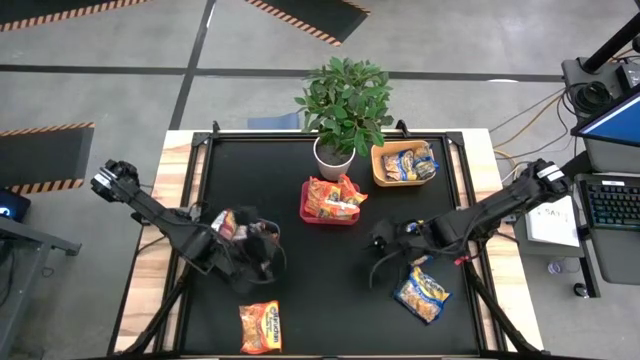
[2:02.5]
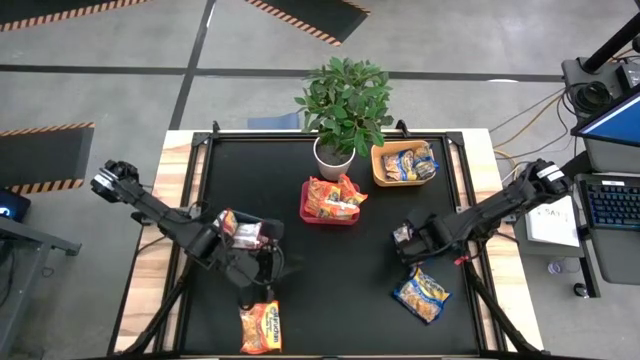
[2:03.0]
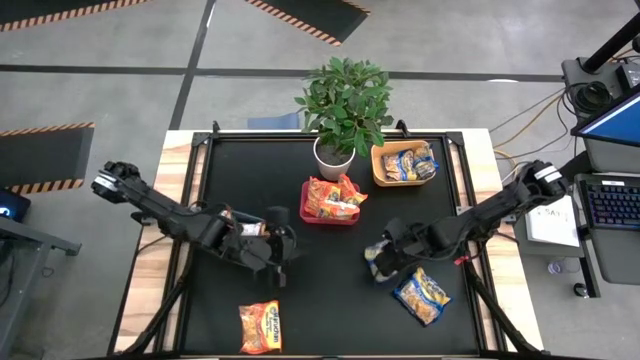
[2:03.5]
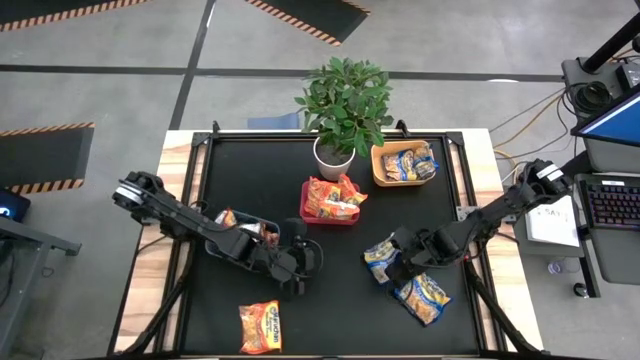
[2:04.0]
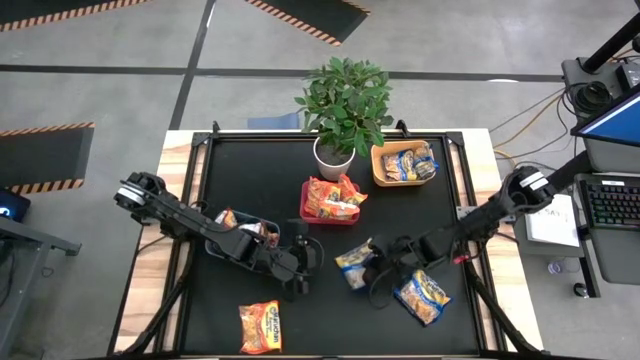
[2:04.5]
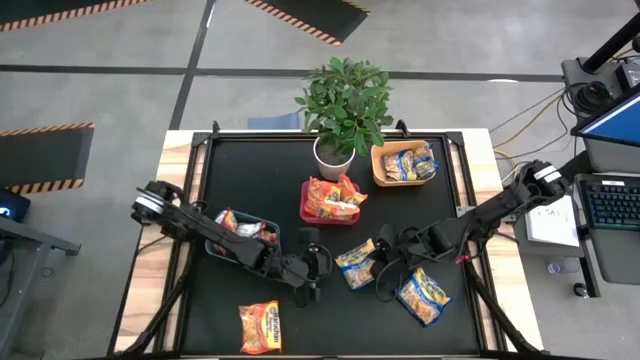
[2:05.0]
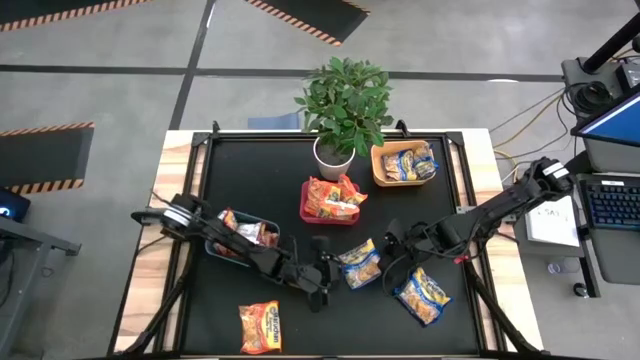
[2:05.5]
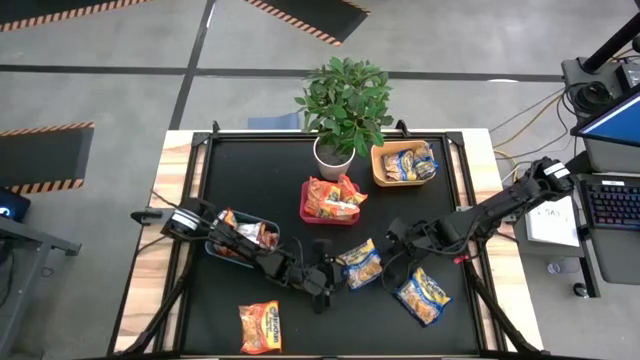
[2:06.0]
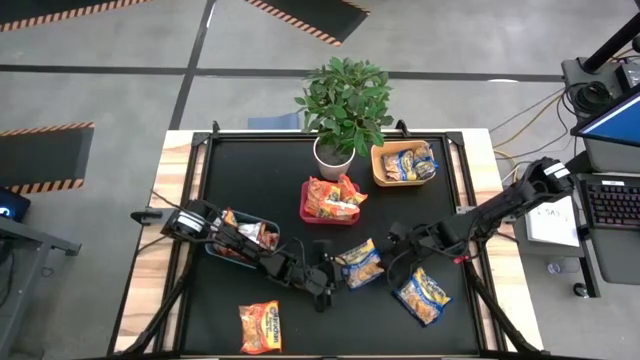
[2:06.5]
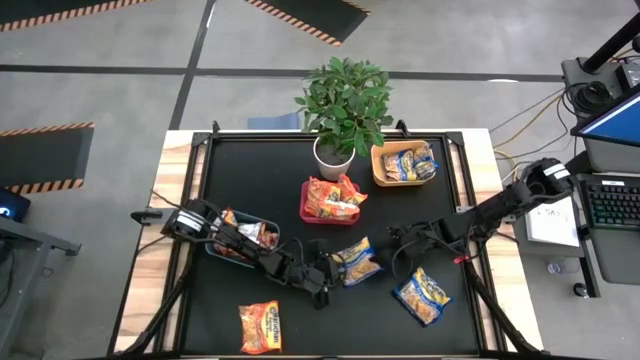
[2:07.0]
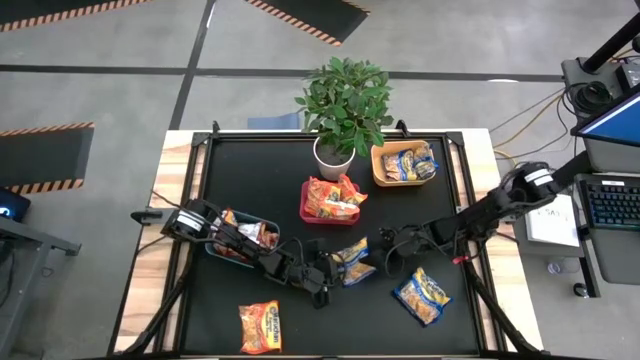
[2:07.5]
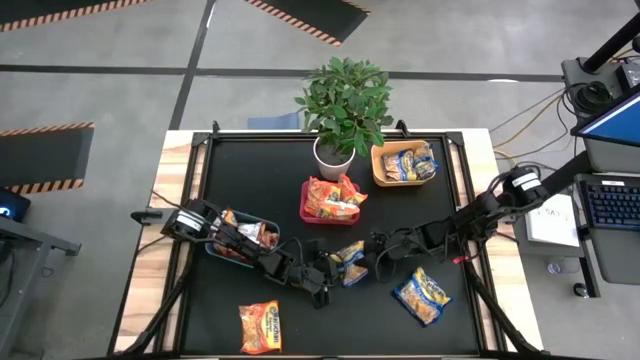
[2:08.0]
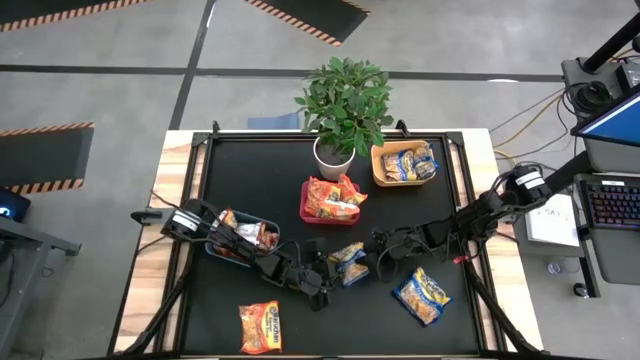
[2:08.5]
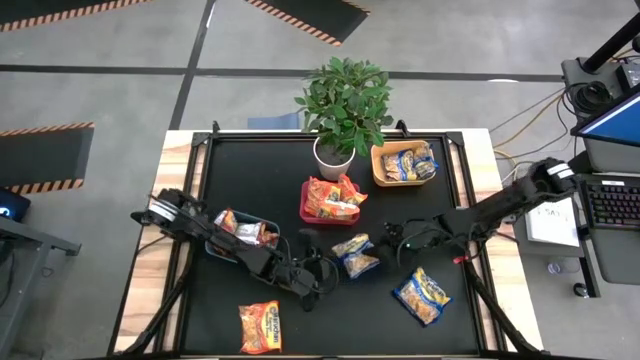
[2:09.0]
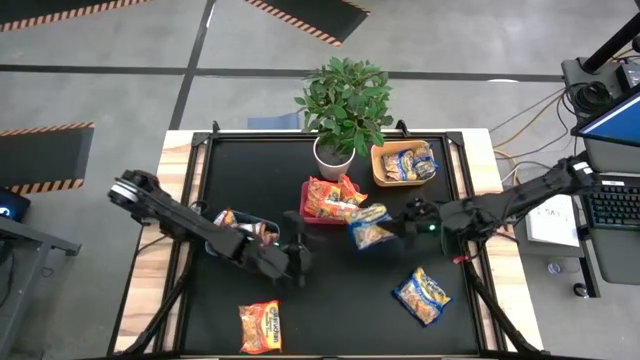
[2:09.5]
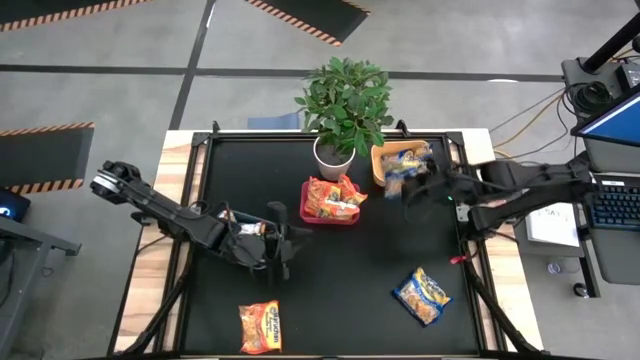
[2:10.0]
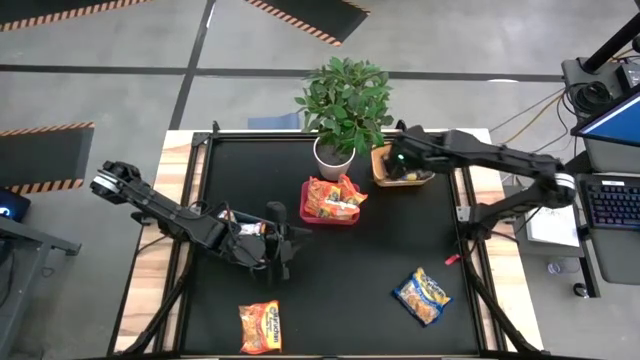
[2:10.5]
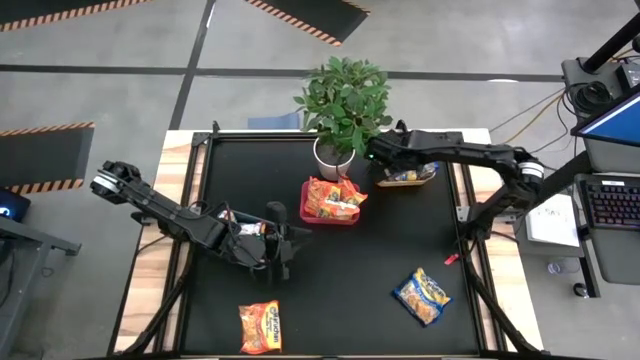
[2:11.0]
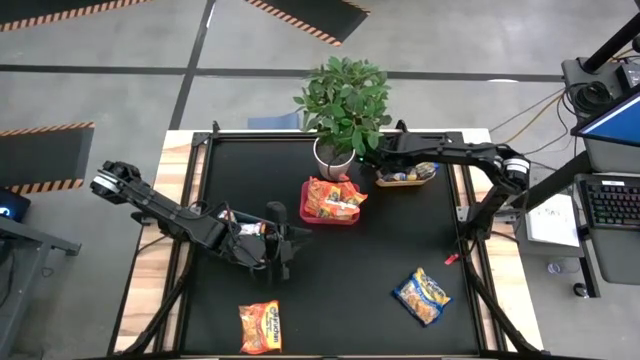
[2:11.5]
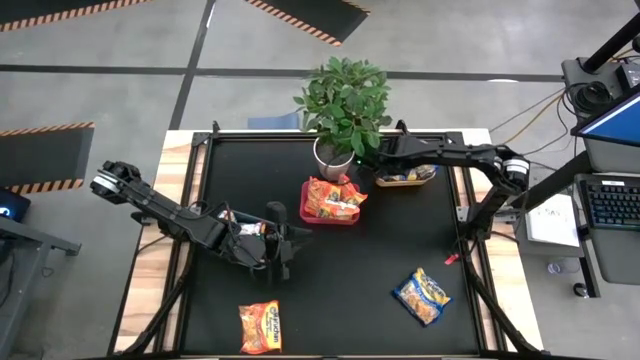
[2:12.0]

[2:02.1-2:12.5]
Task: Sort Maruchan noodles
Put the top blue noodle pack into the yellow bin

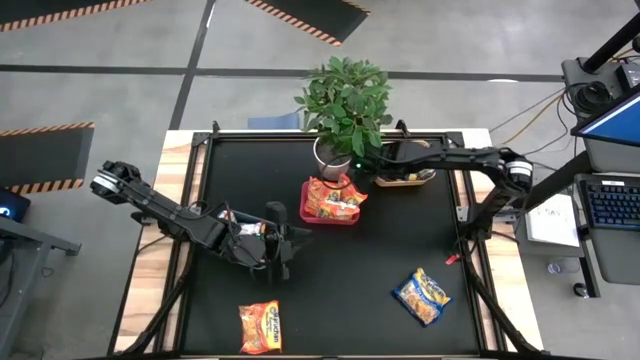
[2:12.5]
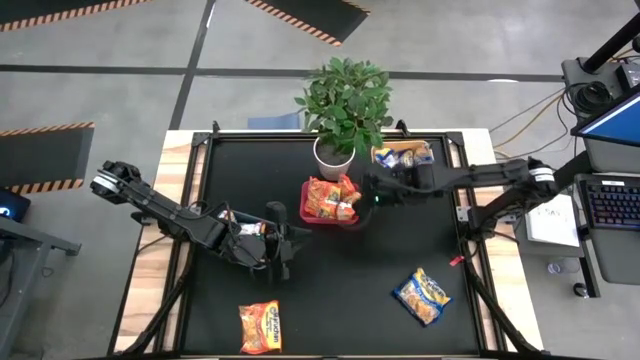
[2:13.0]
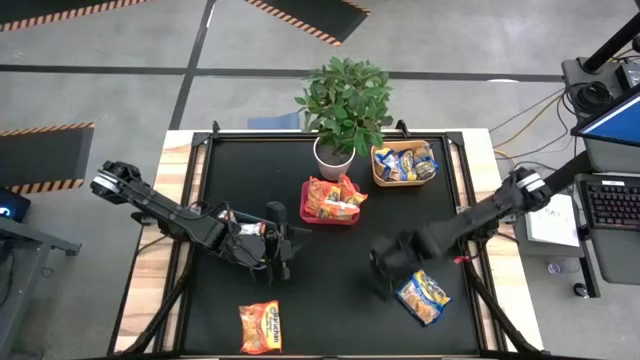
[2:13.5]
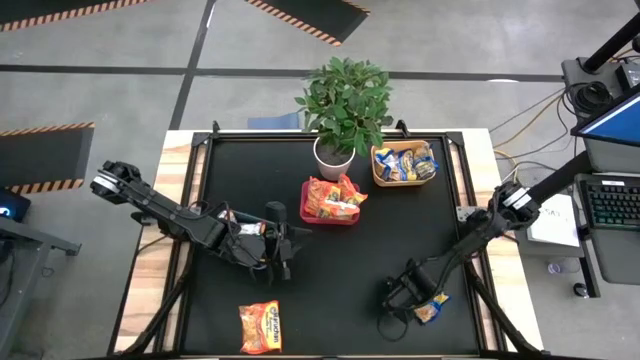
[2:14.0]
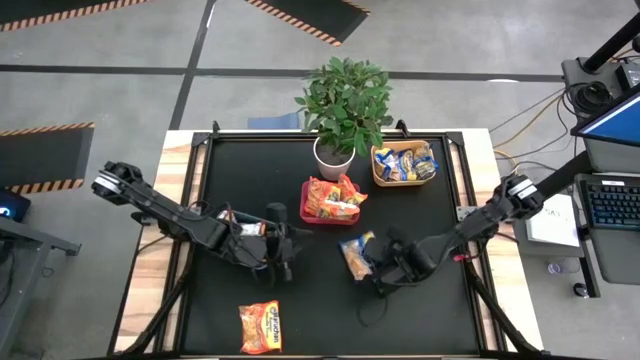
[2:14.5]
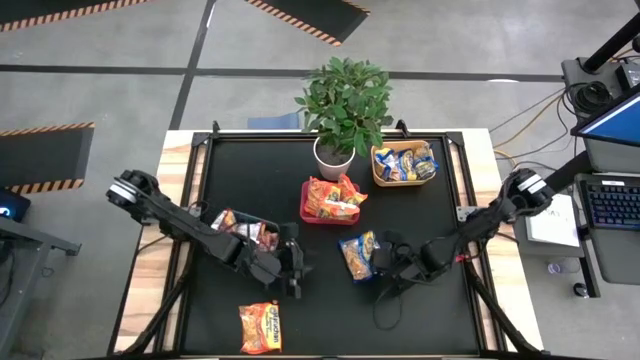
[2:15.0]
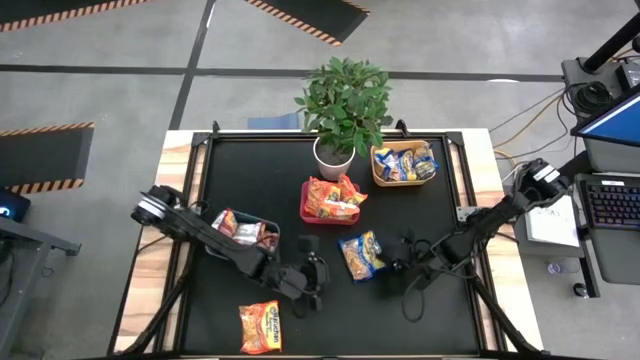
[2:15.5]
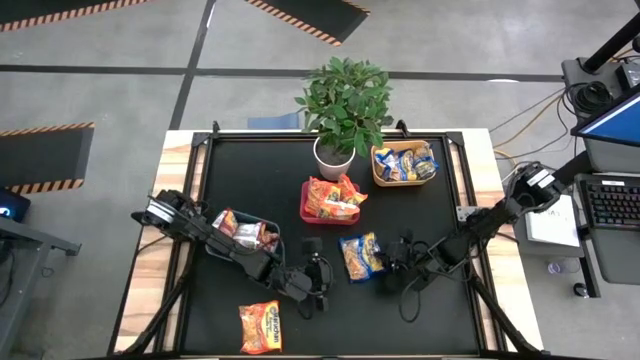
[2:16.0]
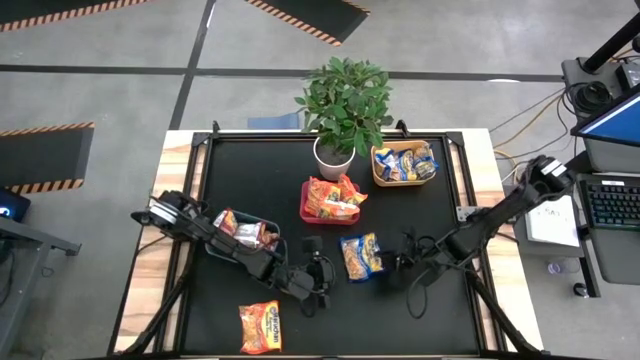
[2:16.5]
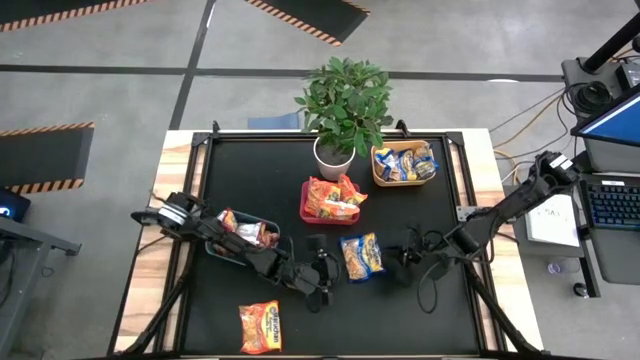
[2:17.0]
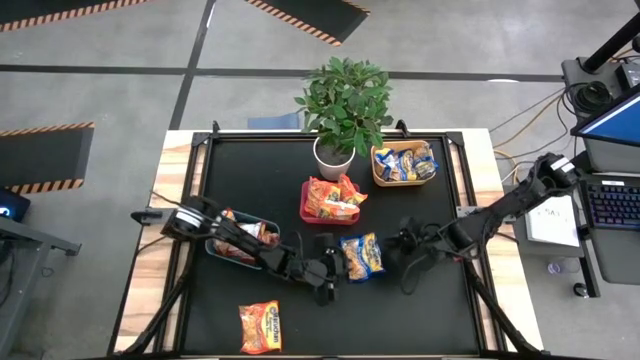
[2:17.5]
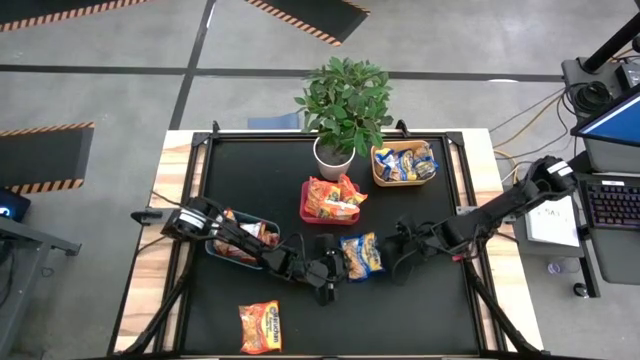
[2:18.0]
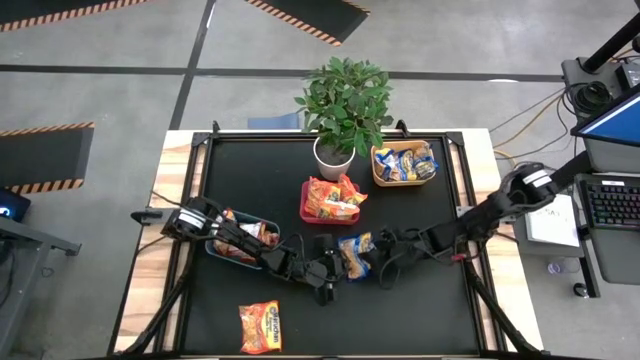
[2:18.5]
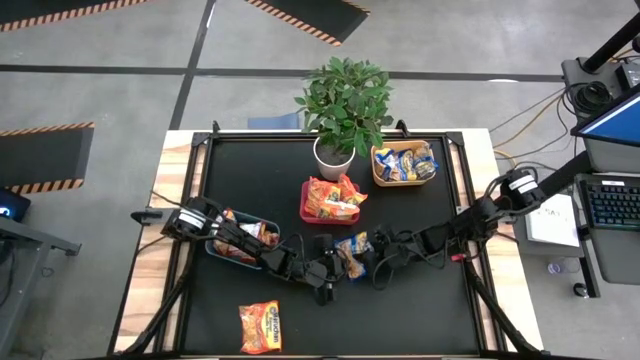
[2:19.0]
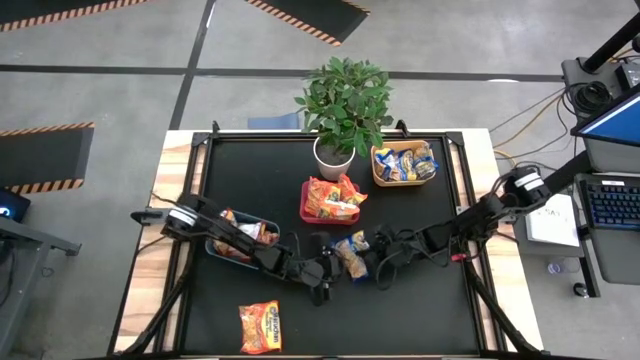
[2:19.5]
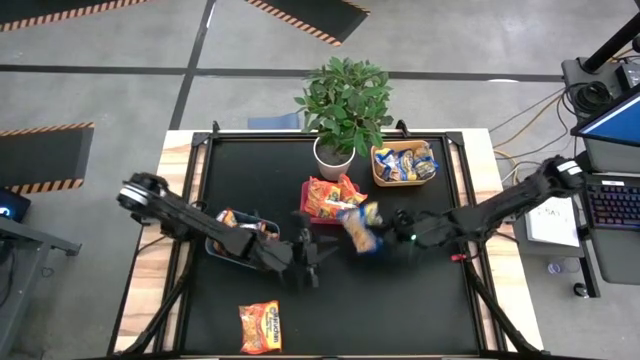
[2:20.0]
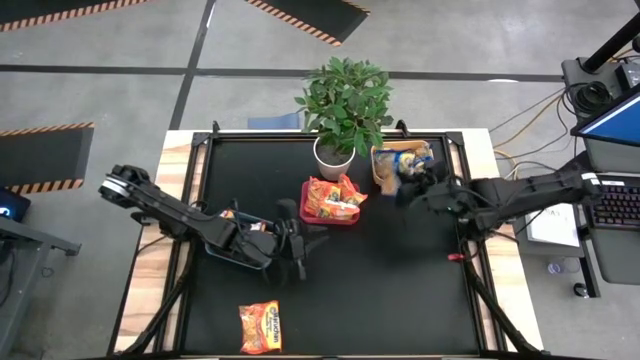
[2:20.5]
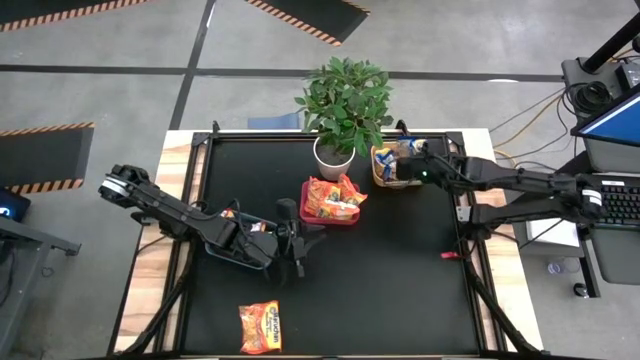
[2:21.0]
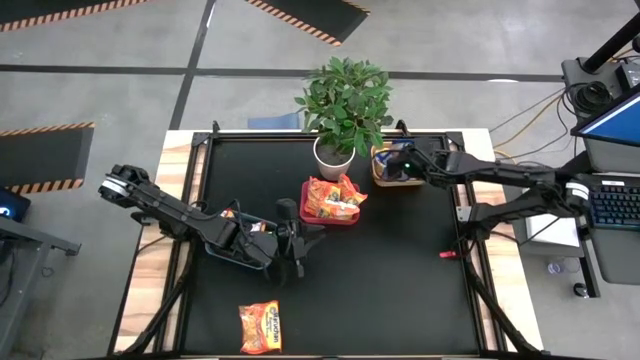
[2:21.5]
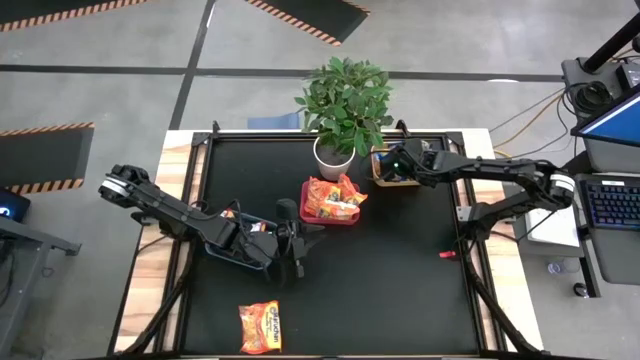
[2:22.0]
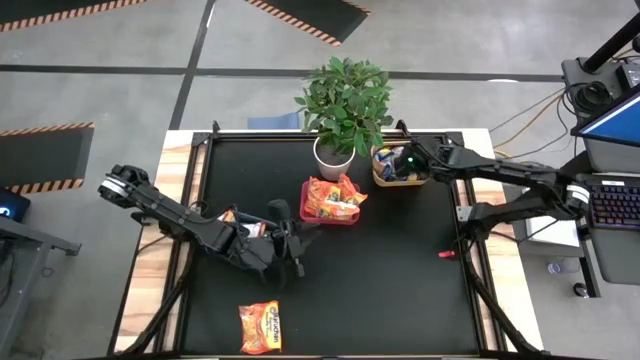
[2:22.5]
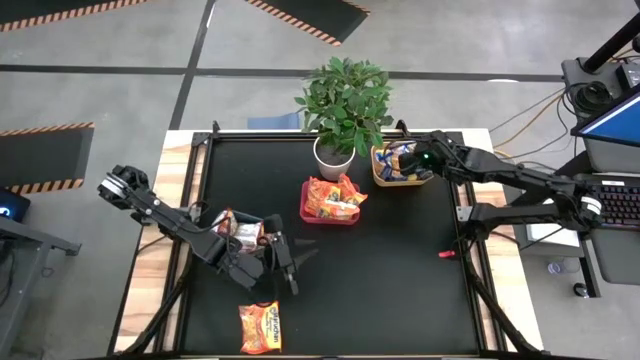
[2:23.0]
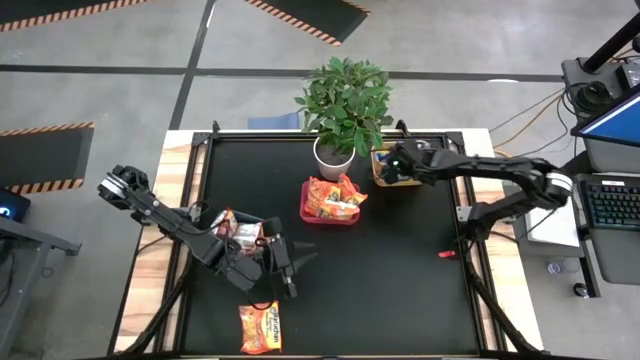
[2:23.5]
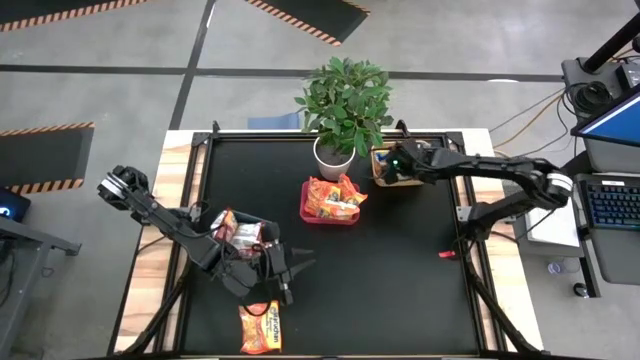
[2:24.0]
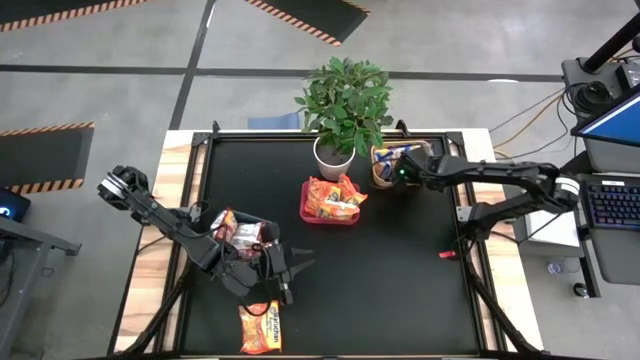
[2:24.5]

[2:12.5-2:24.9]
Put the blue noodle pack into the yellow bin
